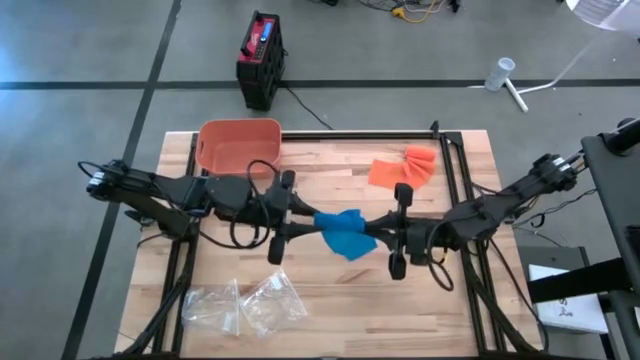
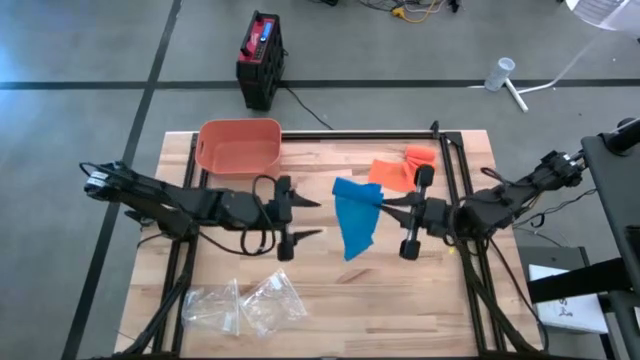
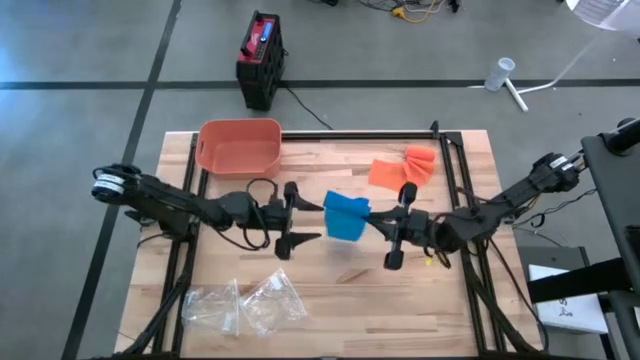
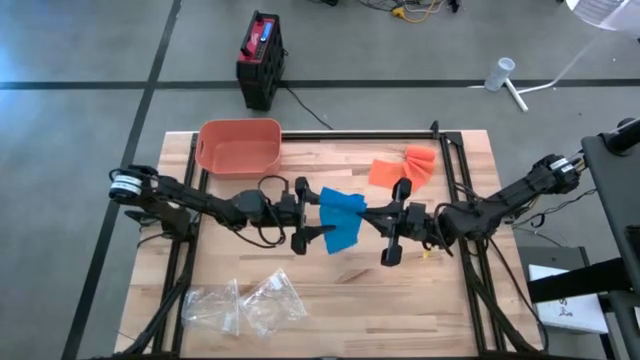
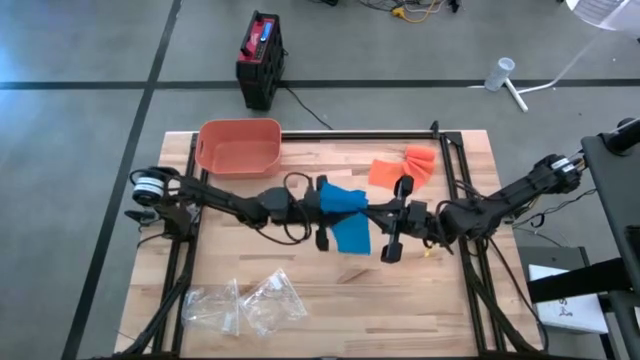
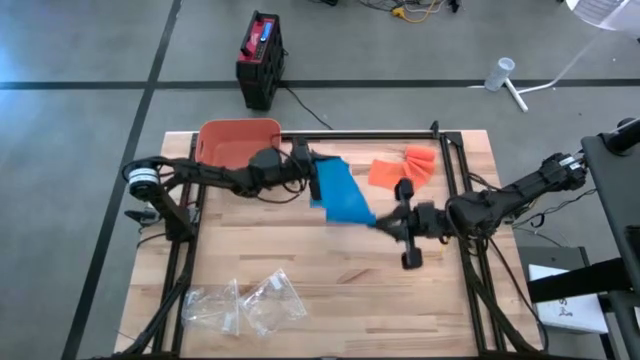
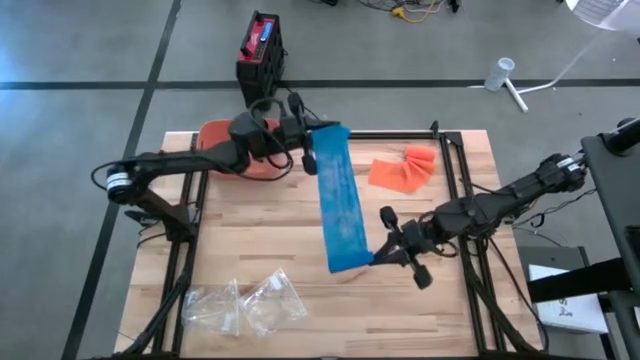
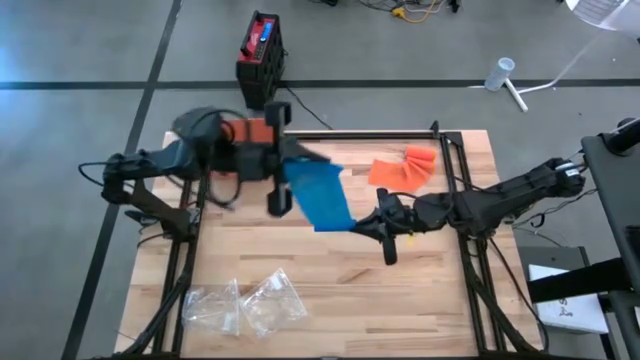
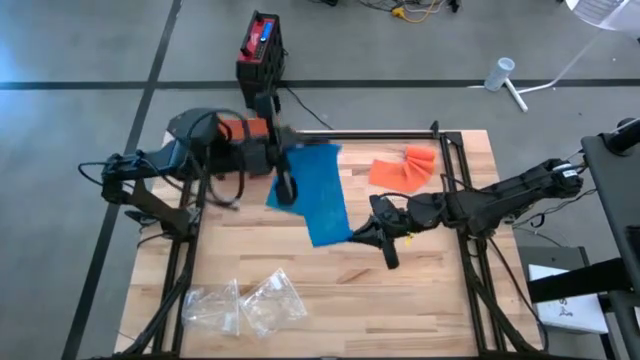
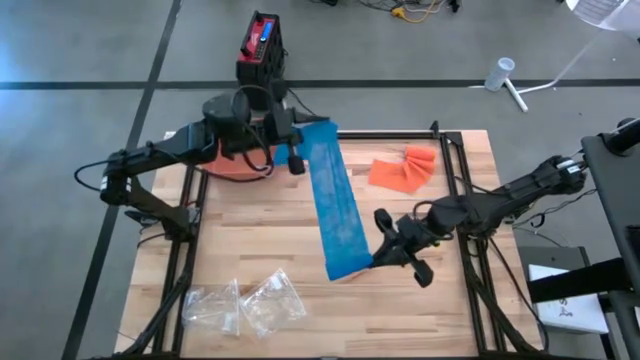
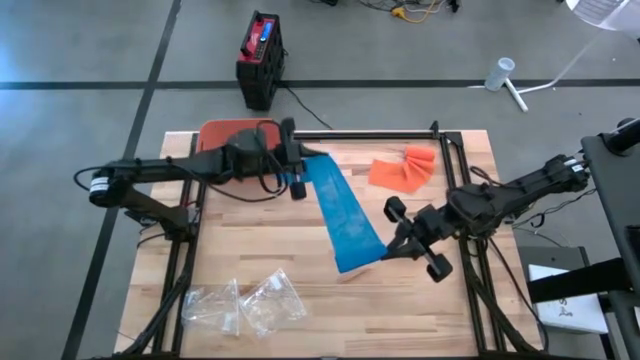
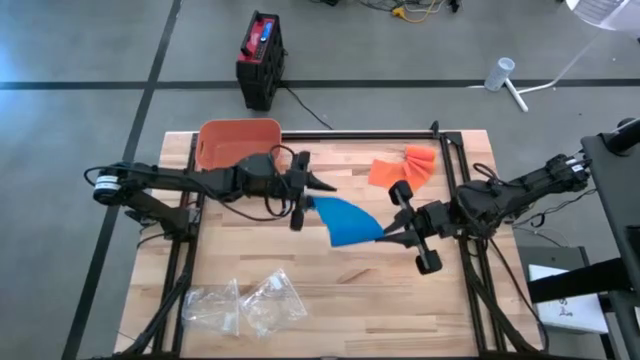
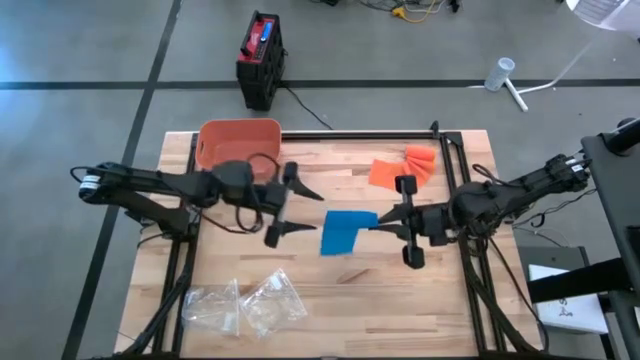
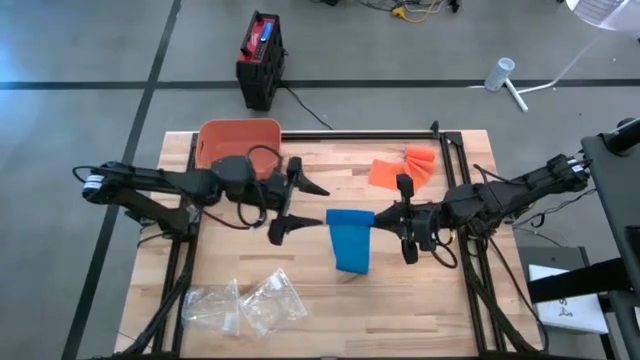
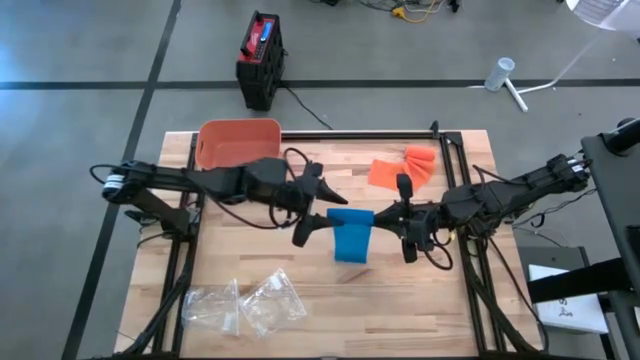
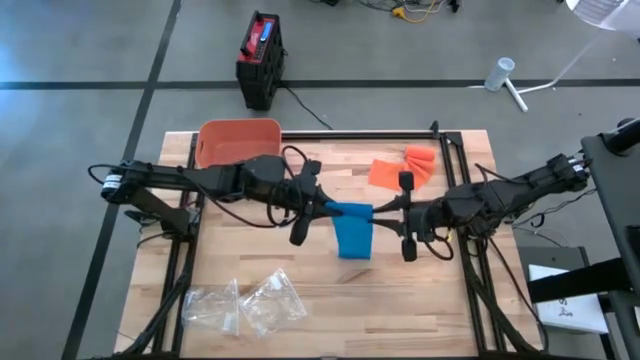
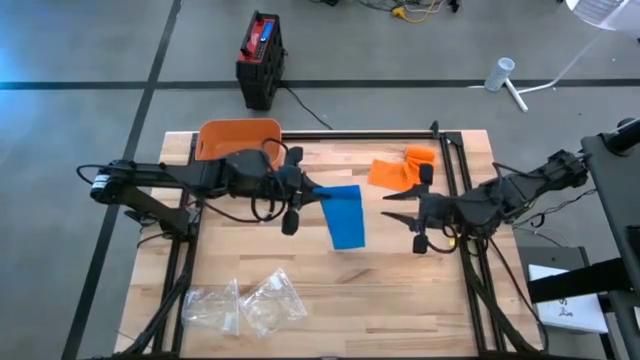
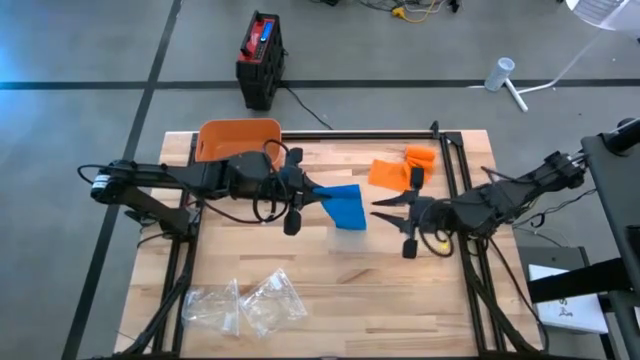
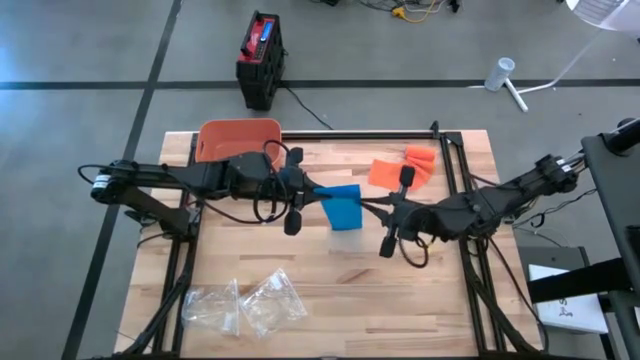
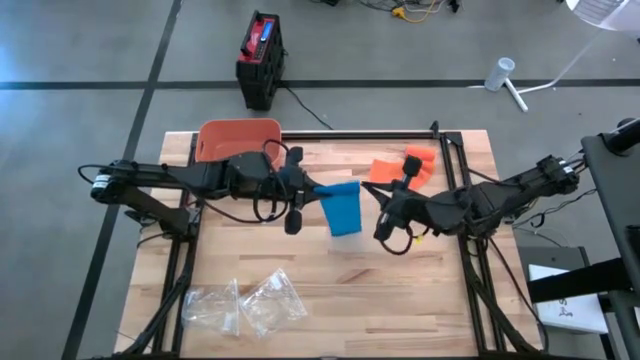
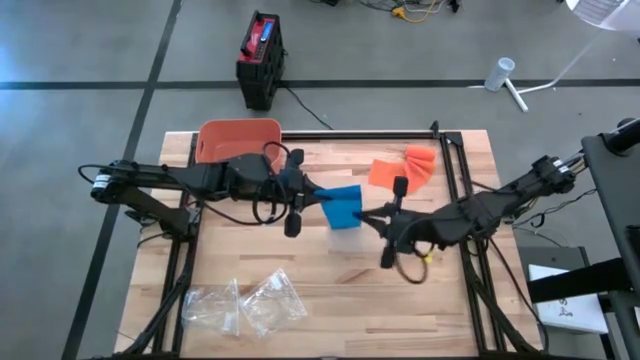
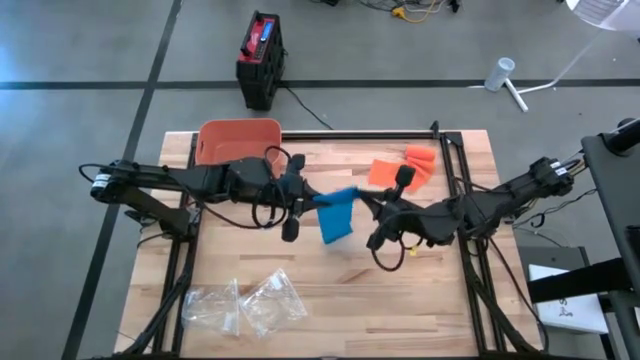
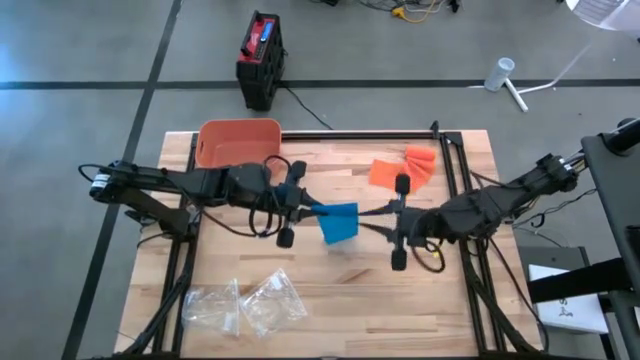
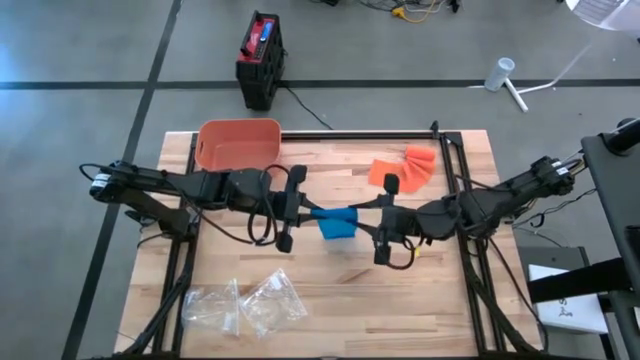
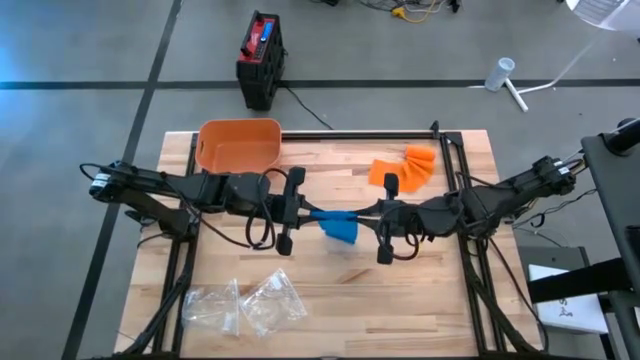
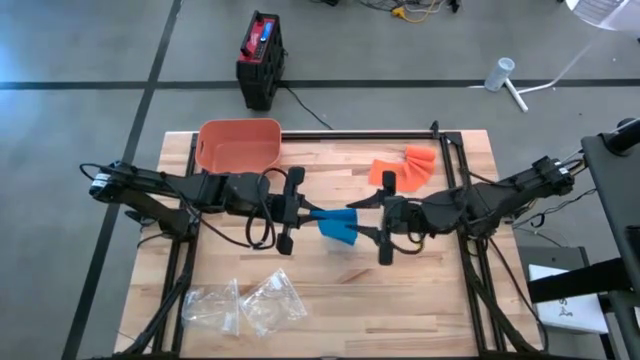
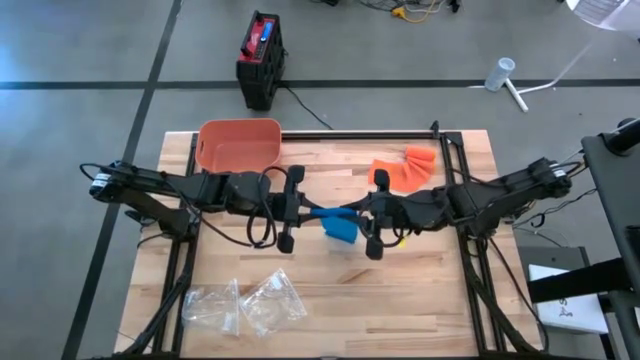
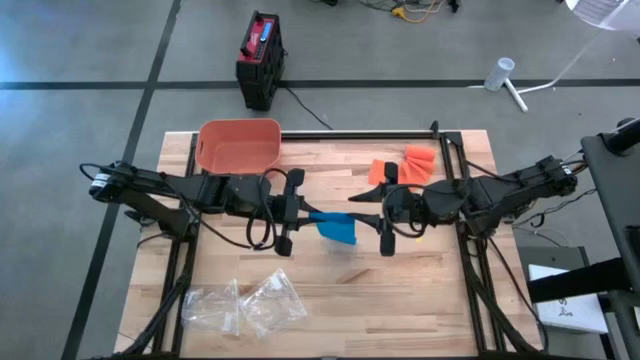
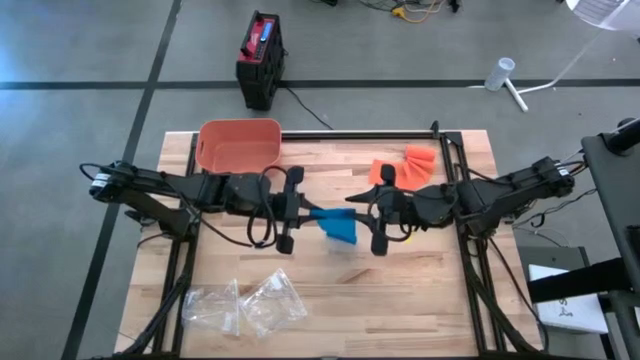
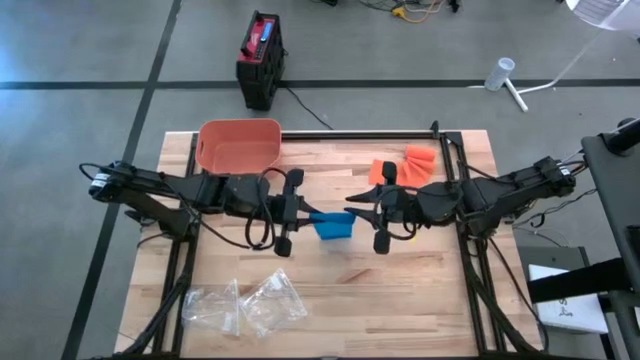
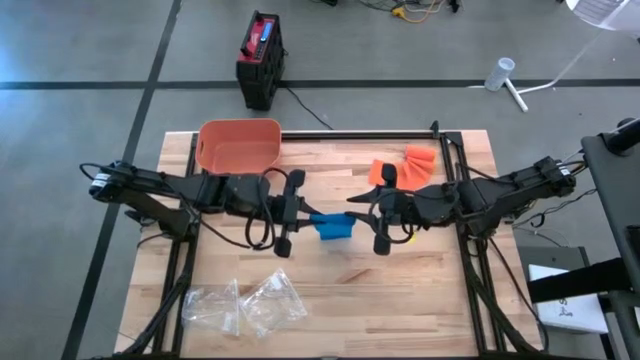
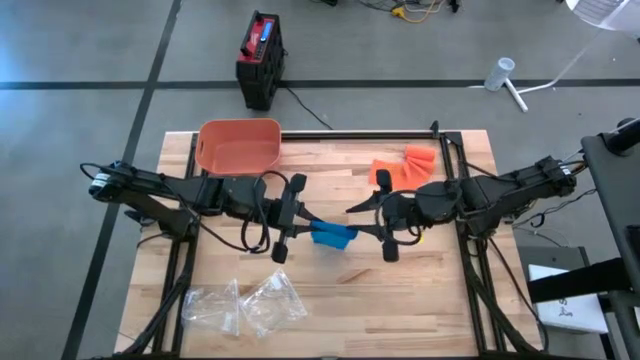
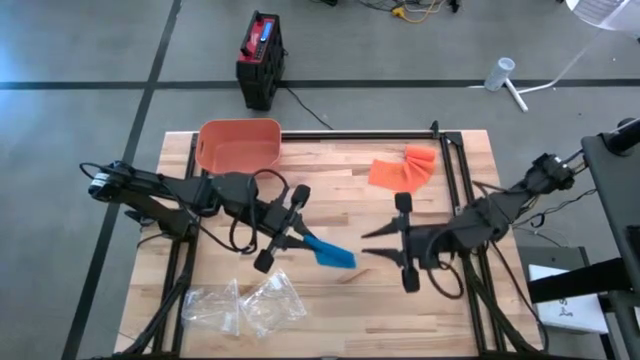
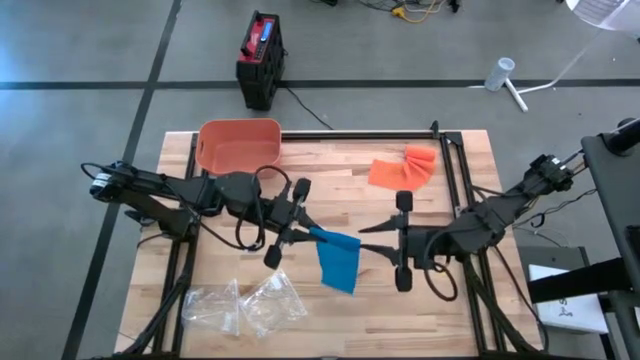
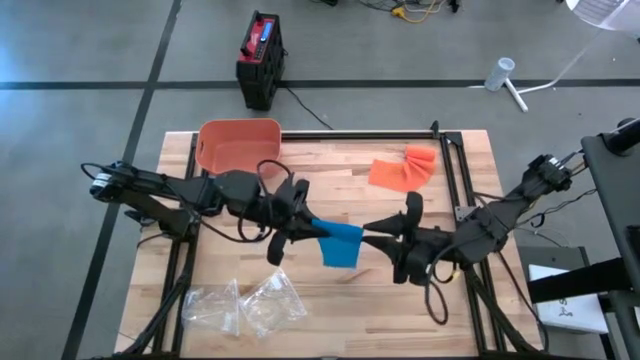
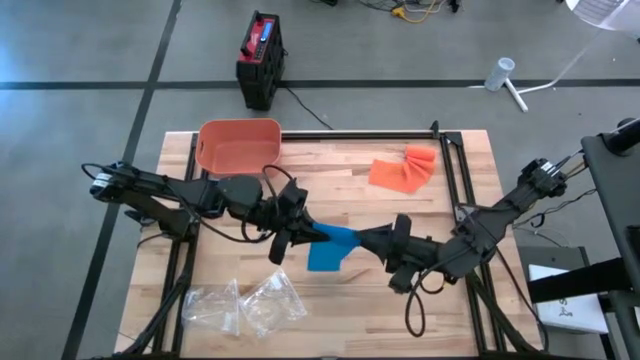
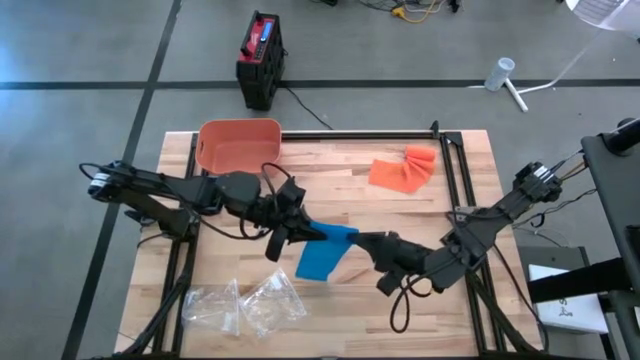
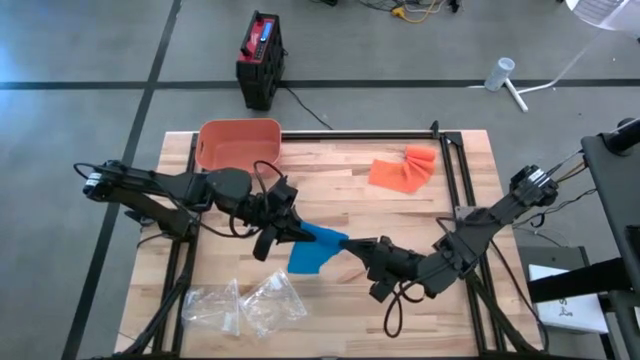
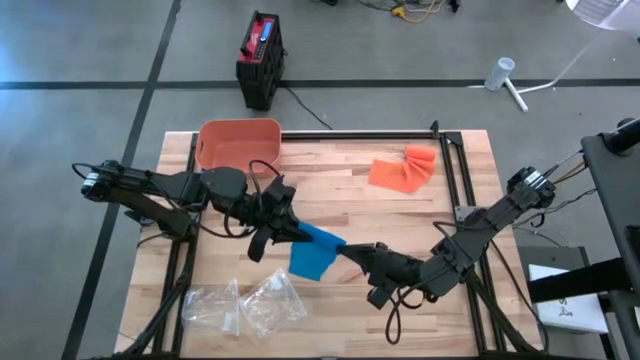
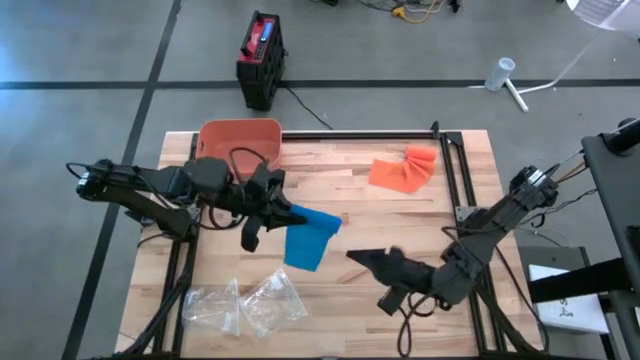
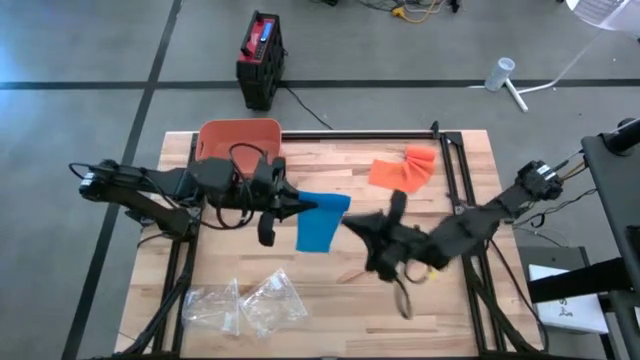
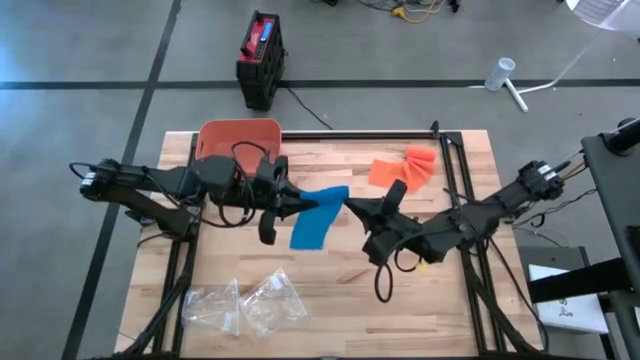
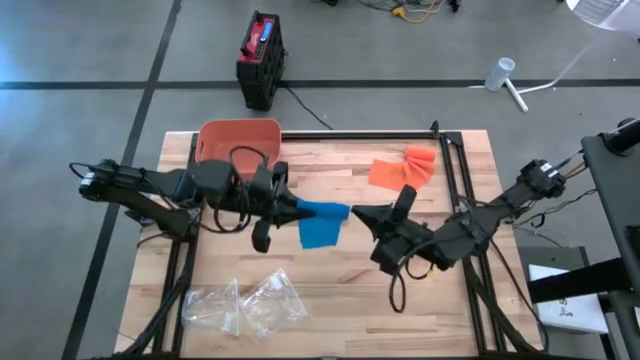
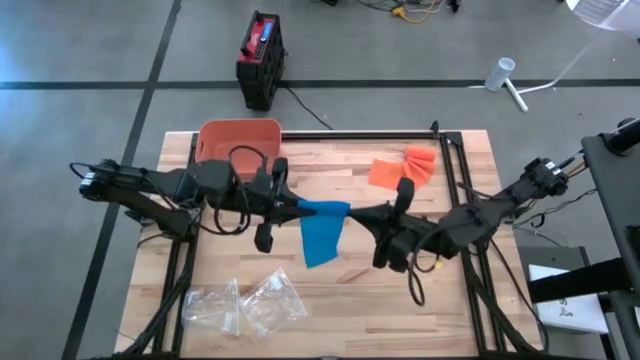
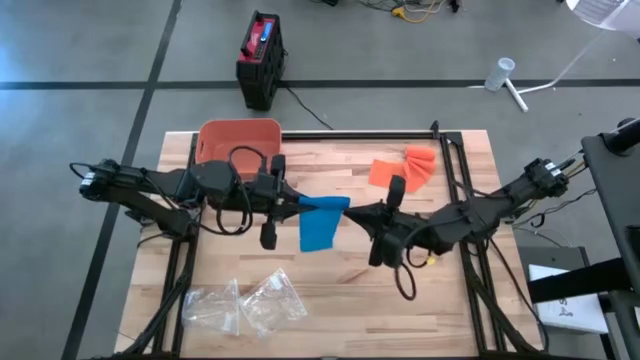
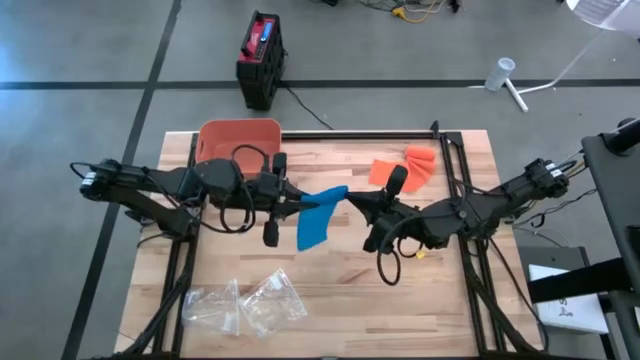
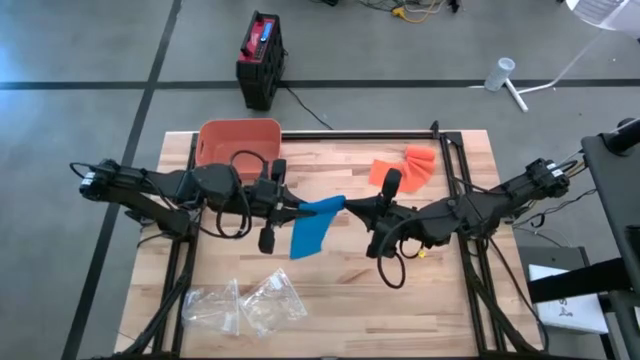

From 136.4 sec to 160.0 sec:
Task: Roll bandage
Roll the blue bandage
